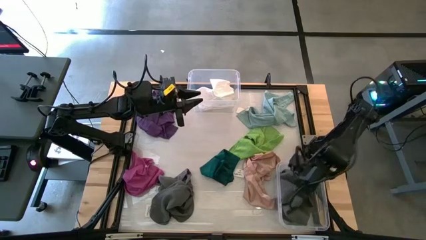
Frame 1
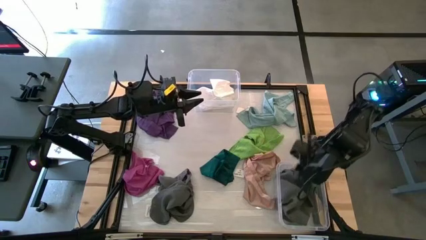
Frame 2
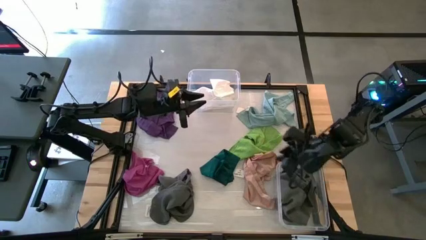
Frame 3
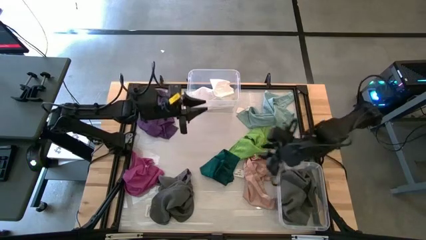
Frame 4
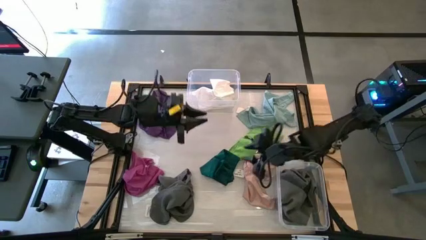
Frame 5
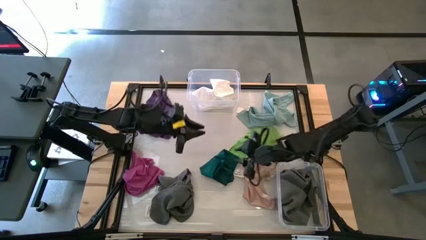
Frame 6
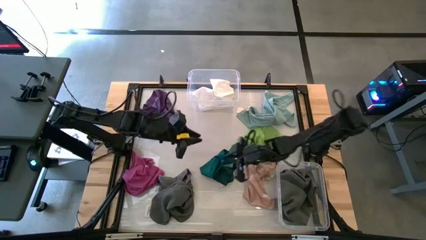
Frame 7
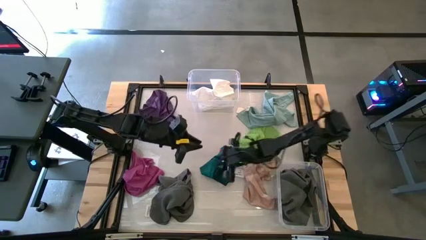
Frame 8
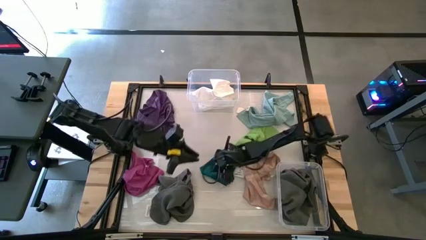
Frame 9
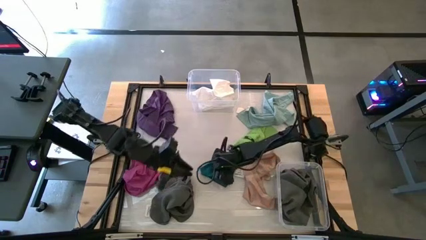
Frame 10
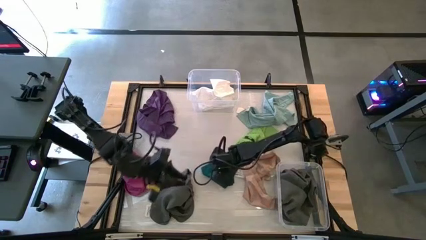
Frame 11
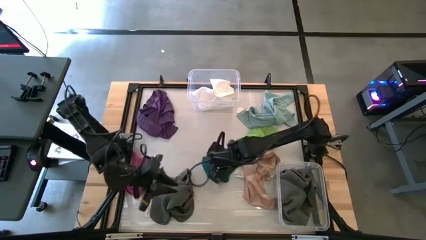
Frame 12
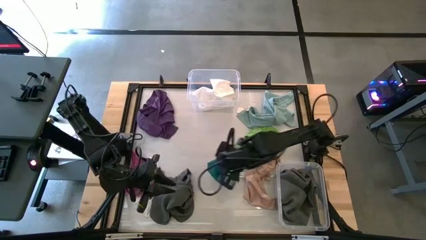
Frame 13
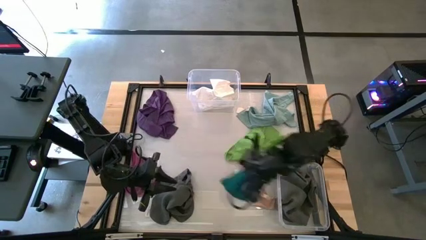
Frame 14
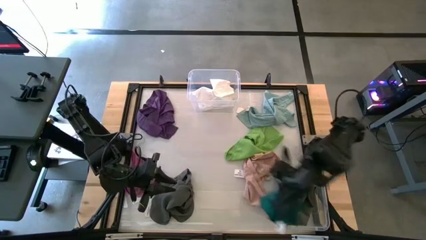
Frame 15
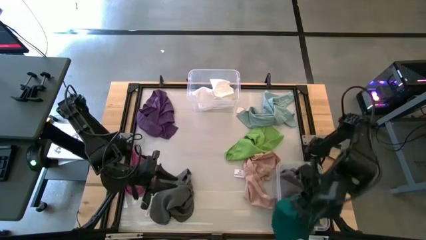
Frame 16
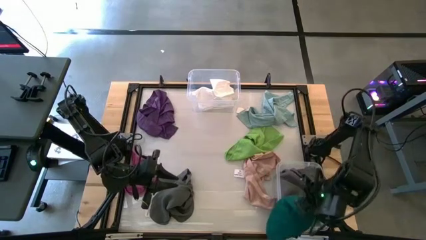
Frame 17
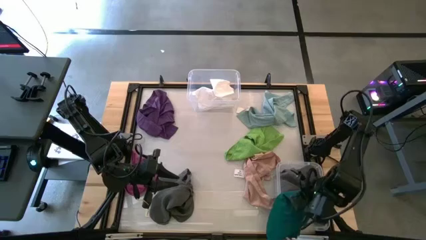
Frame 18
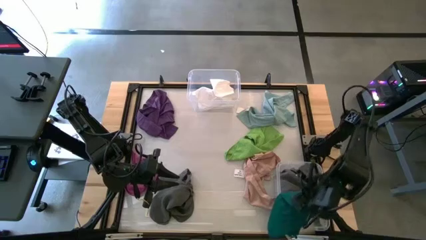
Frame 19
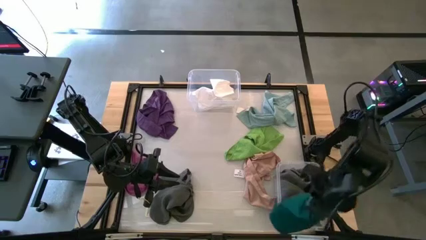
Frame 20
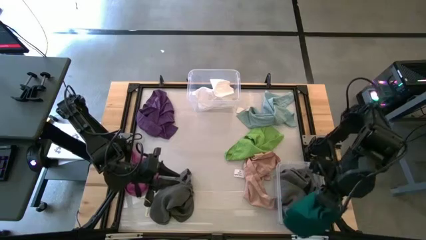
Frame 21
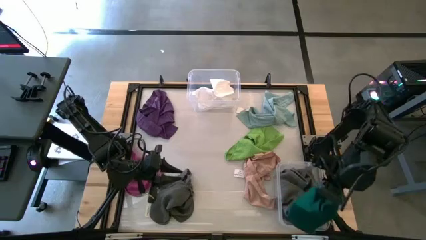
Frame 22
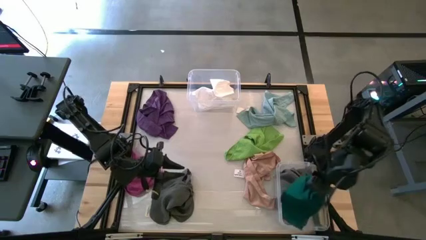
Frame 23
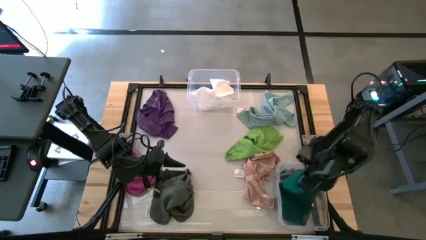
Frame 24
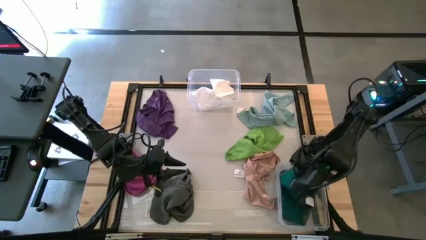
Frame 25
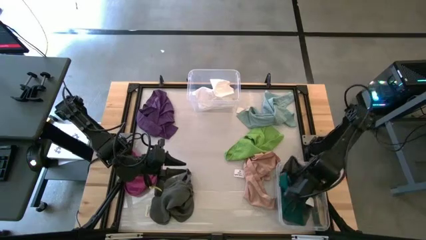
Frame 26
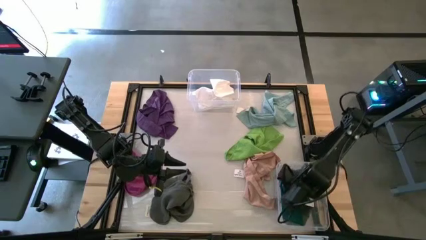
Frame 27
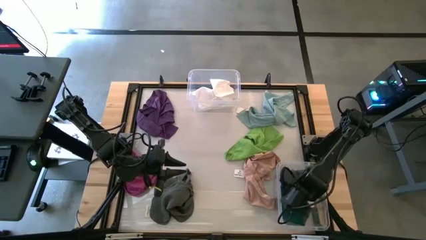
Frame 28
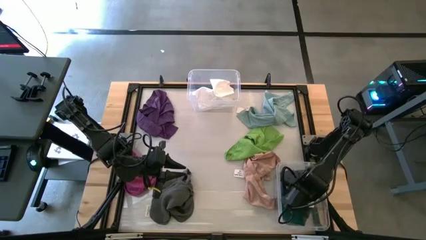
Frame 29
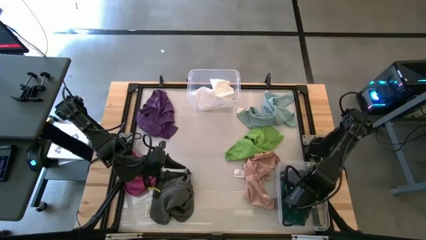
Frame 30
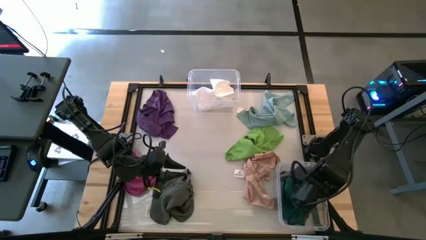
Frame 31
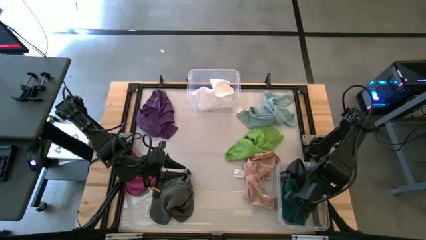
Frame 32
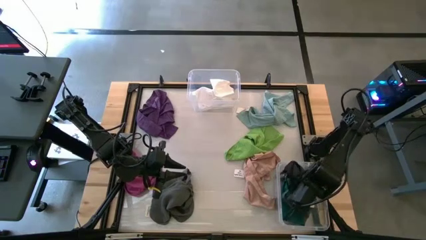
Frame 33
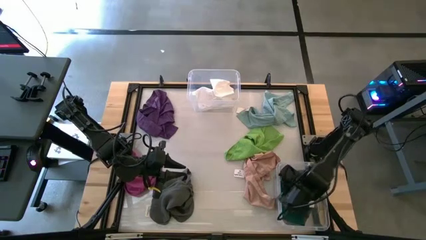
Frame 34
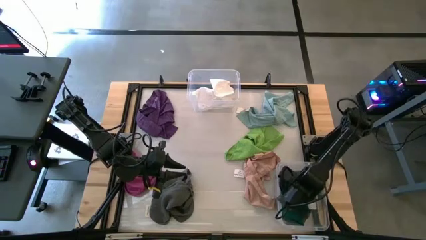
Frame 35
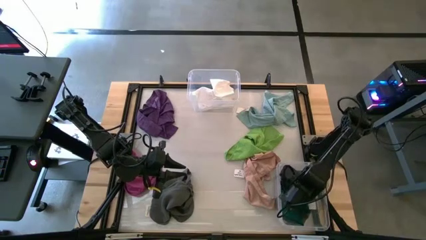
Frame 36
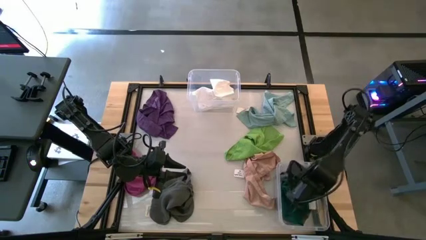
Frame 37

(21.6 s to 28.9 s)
Task: Sort towels by color in basket
Put the dark green towel into the bottom transparent bin

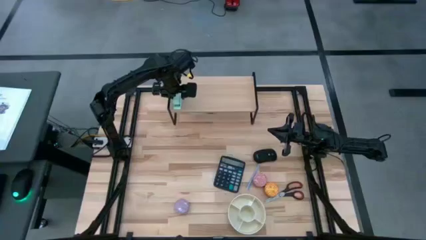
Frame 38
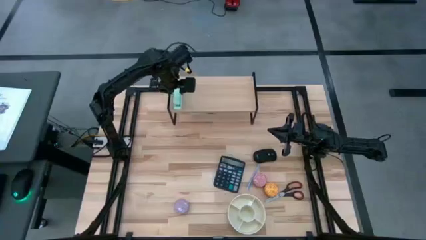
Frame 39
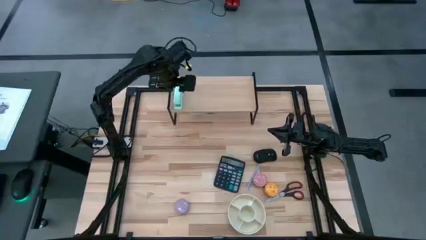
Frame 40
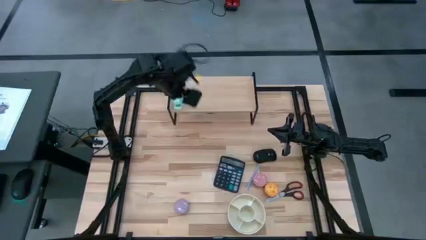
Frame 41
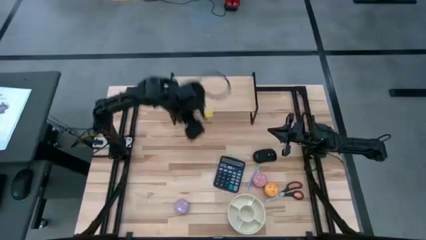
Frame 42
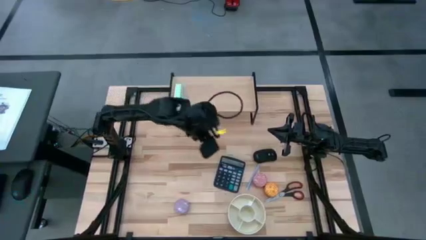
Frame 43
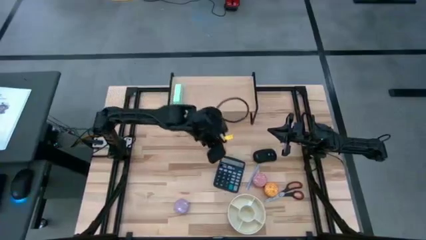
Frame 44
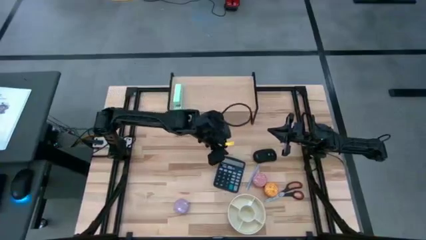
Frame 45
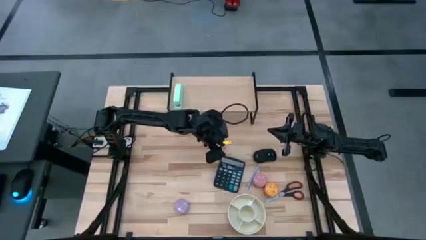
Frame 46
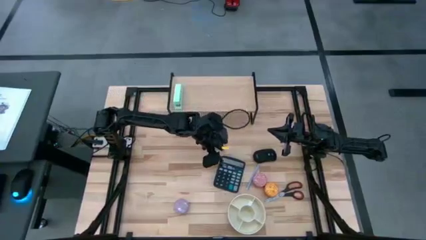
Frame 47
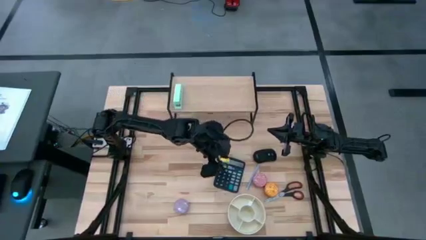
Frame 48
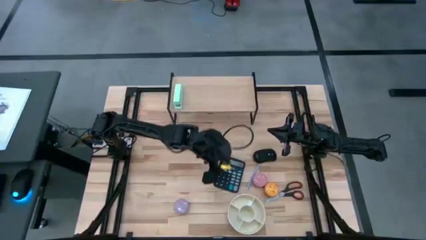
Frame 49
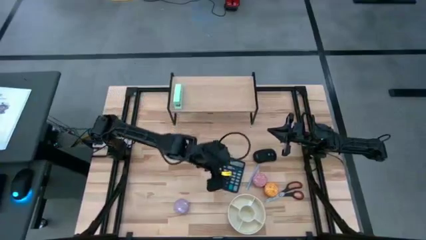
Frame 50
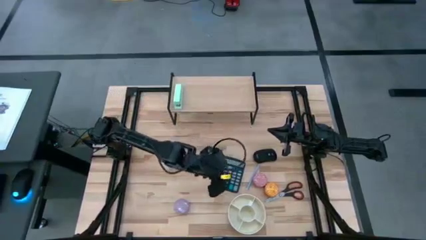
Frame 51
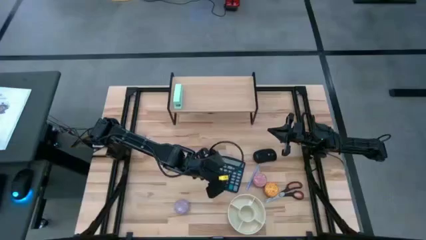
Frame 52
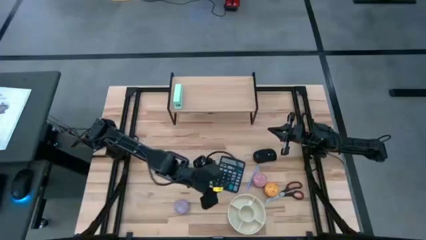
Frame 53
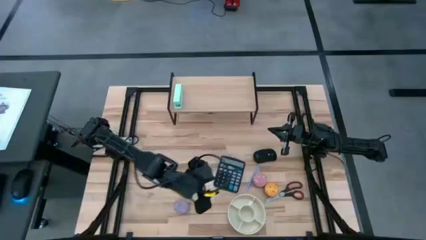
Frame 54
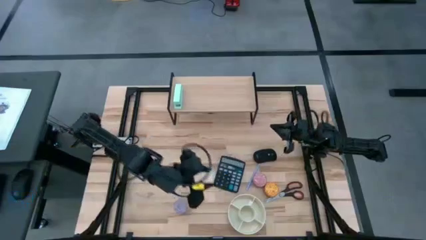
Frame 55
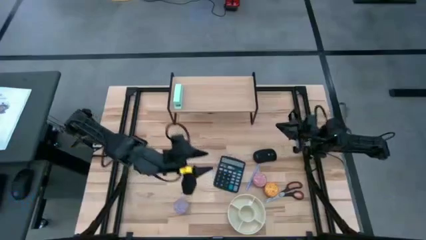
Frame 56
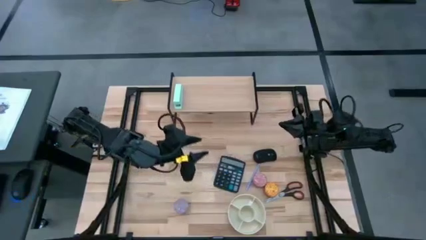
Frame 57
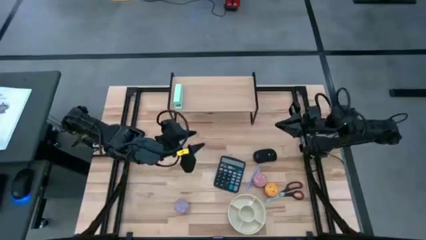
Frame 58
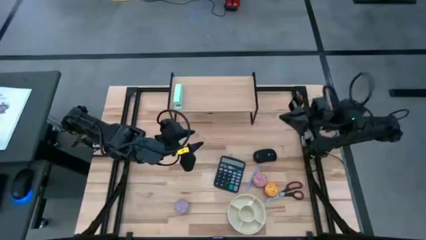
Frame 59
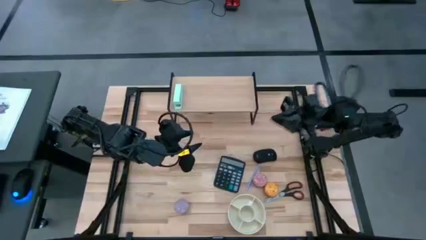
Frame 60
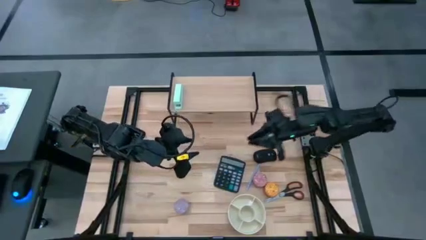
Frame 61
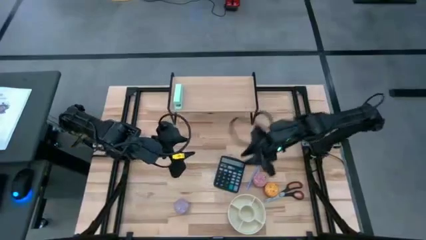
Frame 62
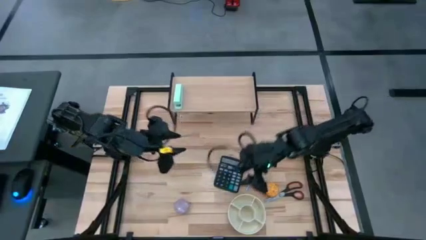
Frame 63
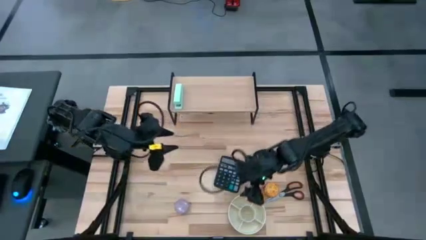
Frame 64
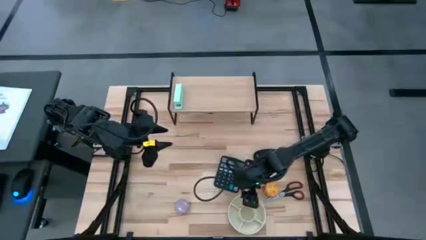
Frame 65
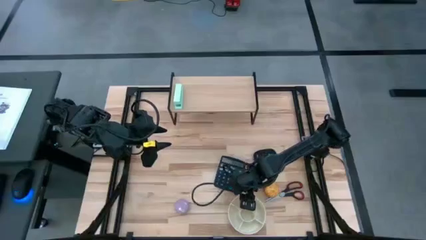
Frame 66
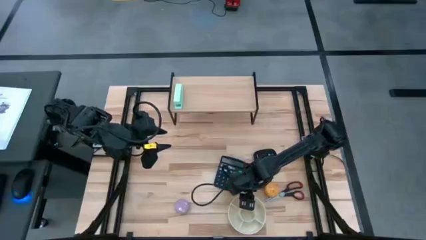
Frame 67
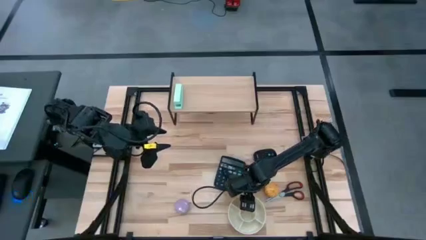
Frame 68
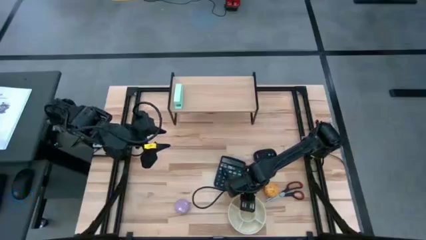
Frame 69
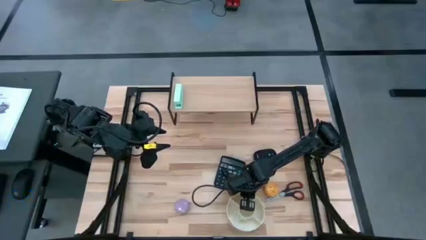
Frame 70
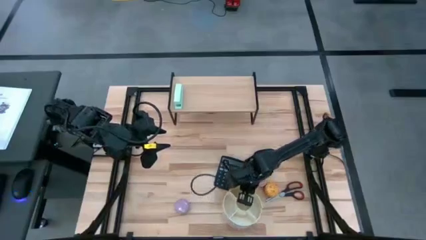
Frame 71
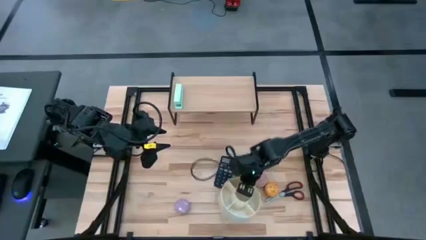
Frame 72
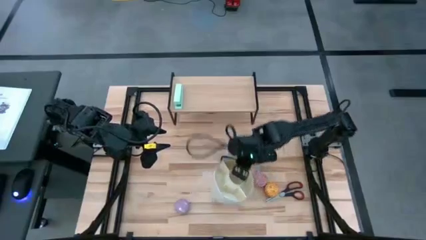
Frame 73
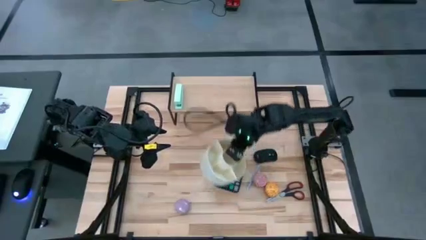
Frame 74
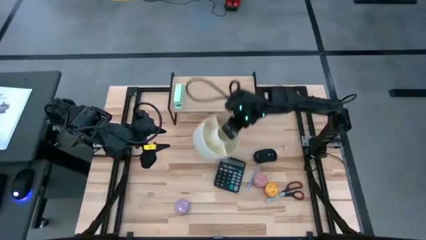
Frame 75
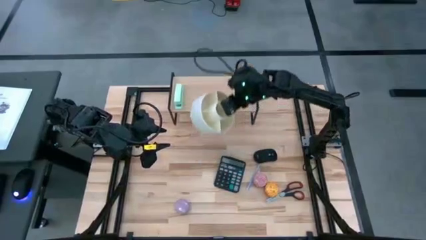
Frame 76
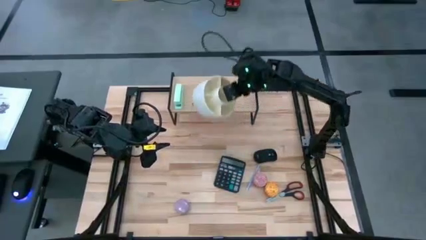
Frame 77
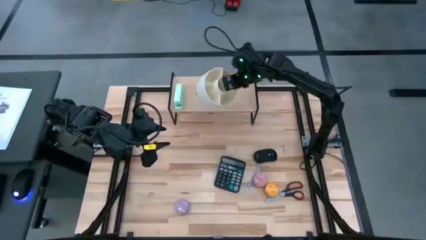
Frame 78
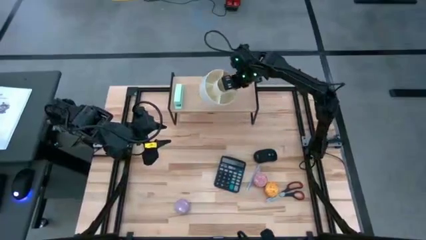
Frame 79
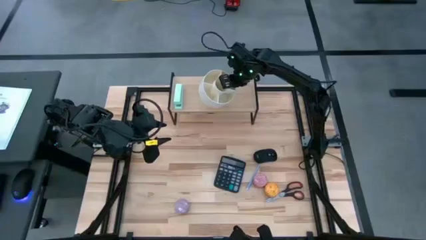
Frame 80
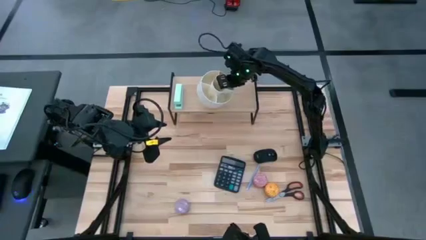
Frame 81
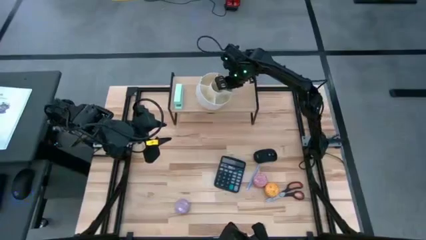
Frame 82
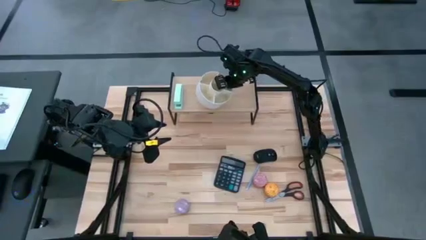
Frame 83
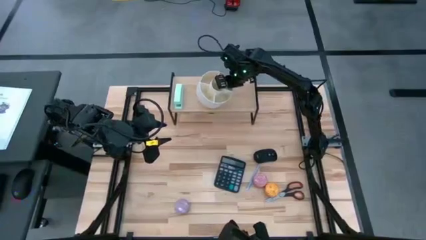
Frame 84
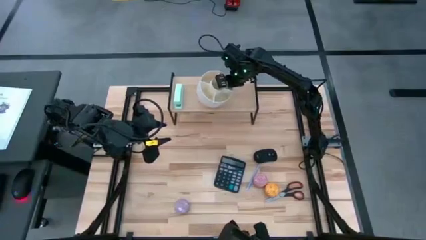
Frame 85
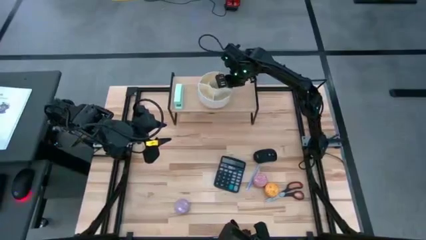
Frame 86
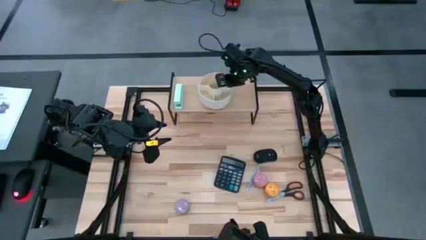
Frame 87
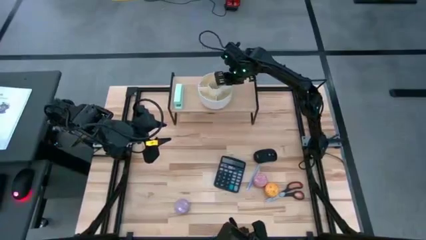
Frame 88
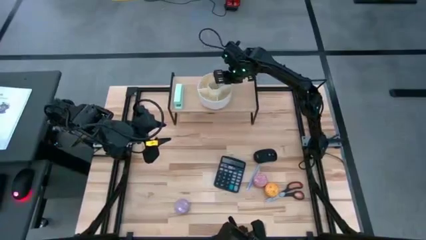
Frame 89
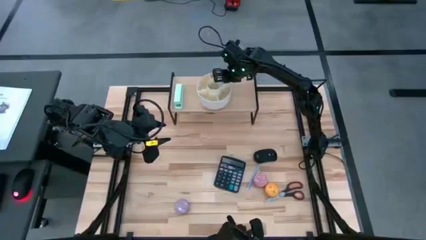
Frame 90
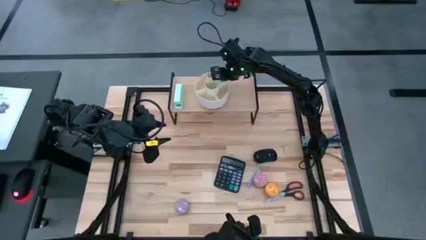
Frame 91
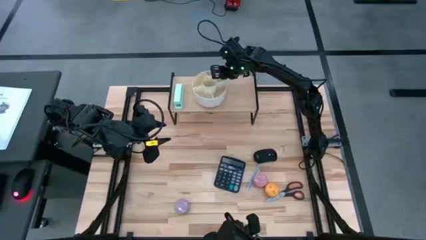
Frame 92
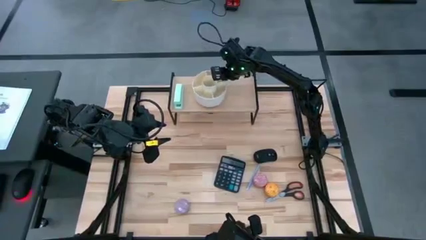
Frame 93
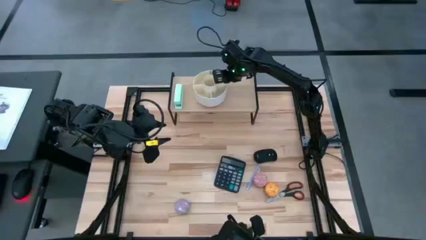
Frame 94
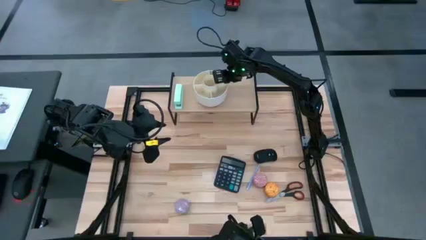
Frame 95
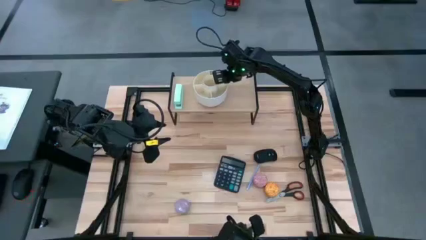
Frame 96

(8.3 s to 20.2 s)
Task: Stock shelves
Put the white desk organizer on the shelf
